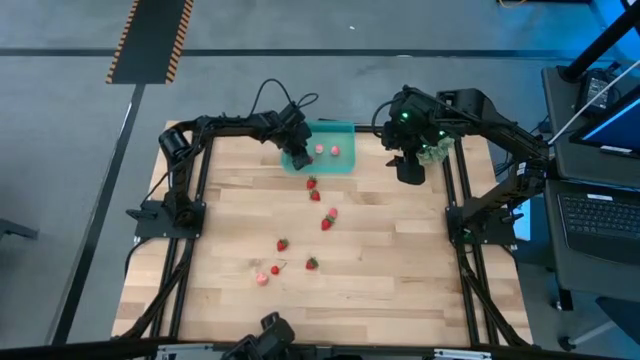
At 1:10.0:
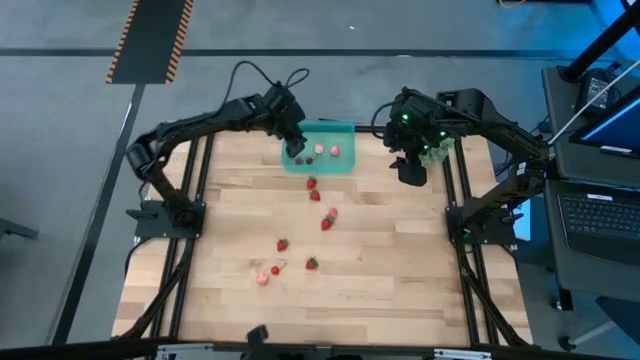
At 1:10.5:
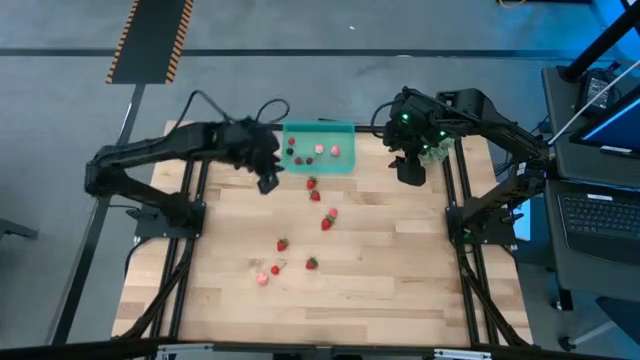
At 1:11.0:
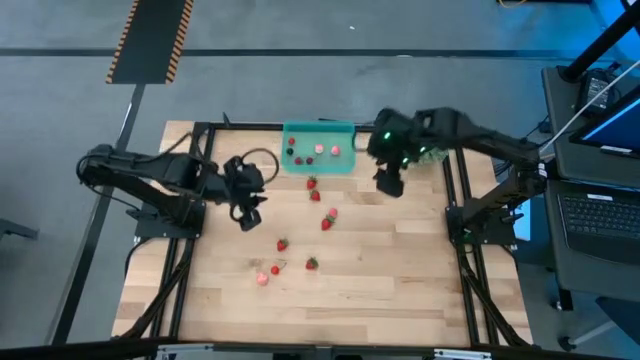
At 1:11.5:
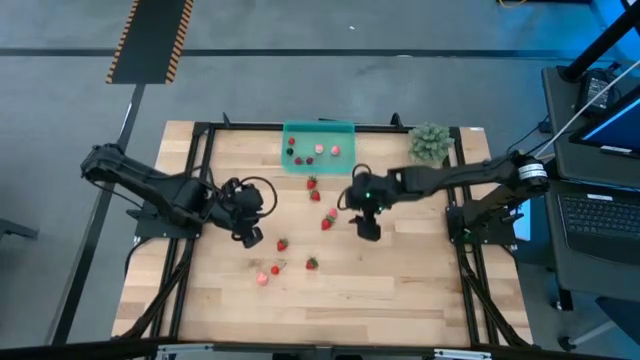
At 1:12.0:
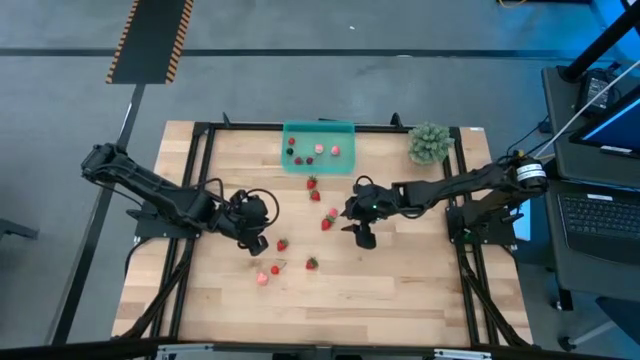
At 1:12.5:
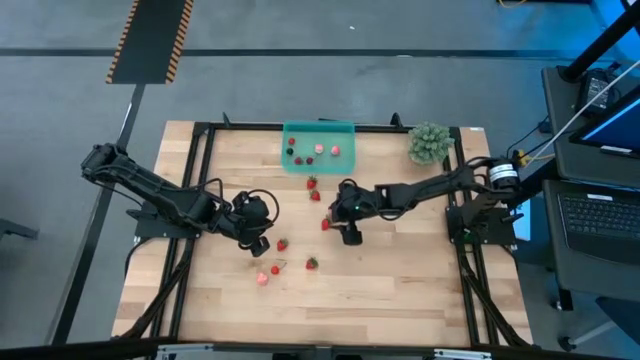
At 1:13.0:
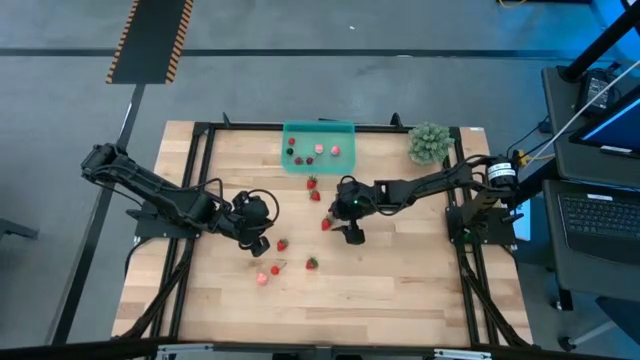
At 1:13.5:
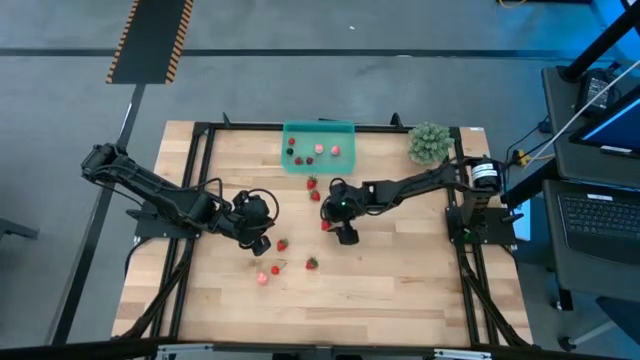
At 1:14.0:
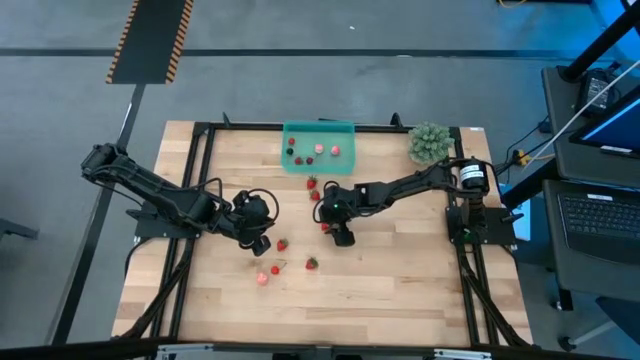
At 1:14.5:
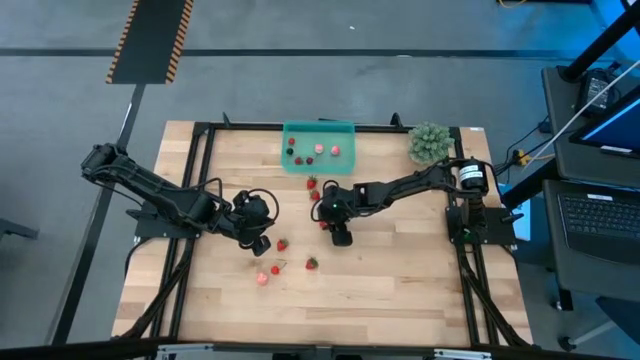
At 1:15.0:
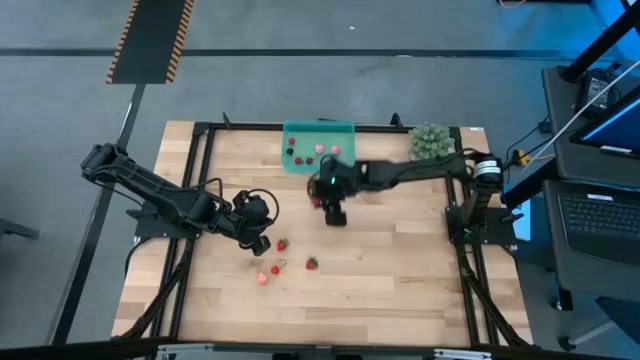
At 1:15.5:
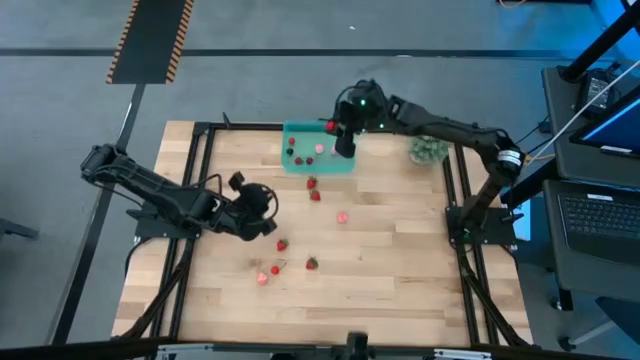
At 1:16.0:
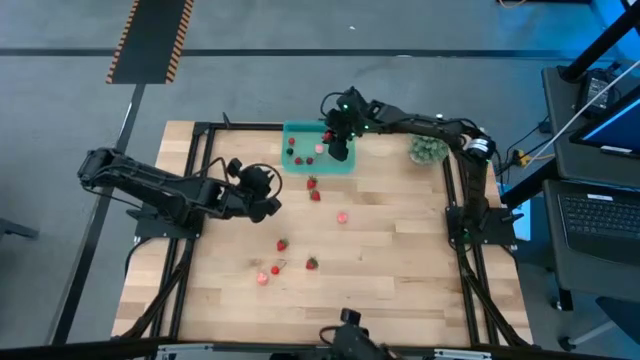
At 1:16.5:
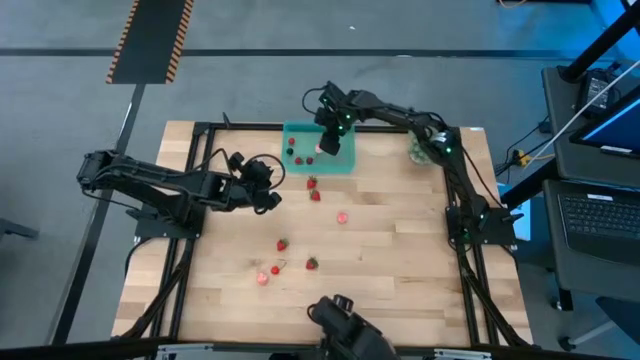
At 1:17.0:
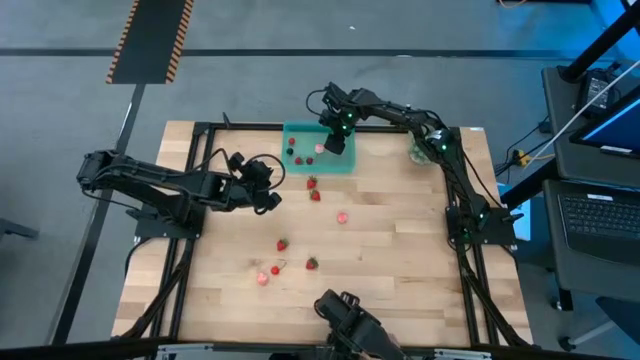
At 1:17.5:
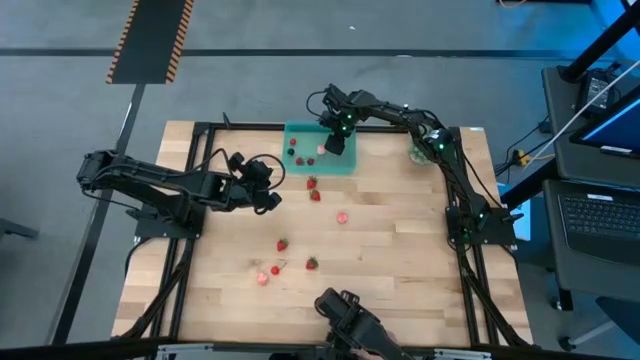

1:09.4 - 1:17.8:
Task: Pick and placing Produce into tupperware
Put the red strawberry into the green container

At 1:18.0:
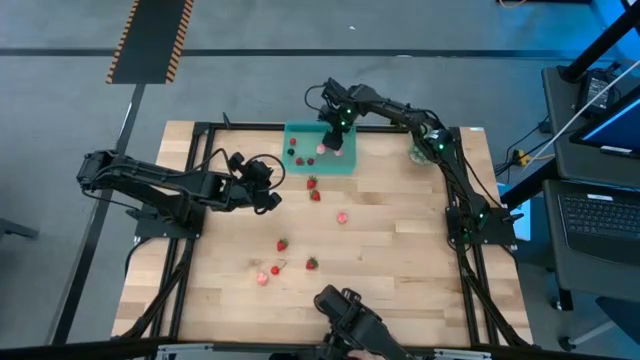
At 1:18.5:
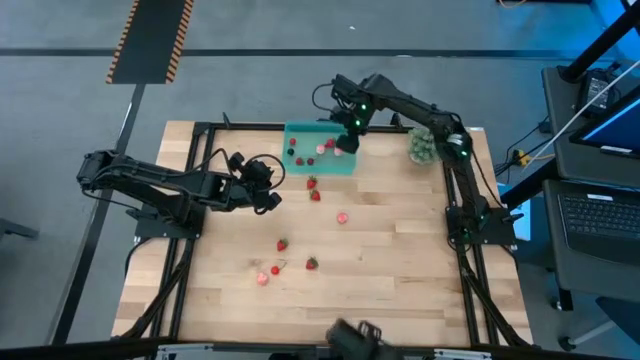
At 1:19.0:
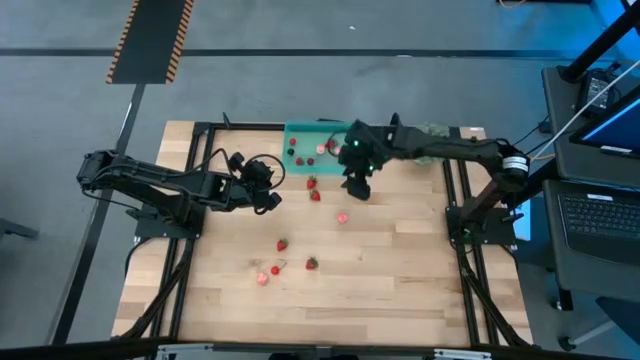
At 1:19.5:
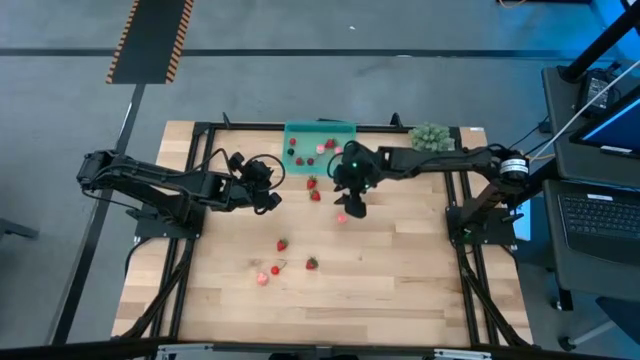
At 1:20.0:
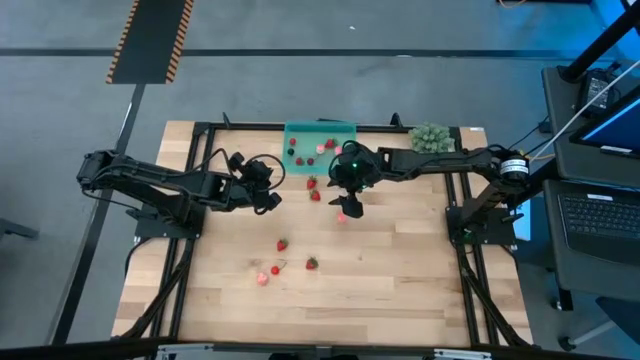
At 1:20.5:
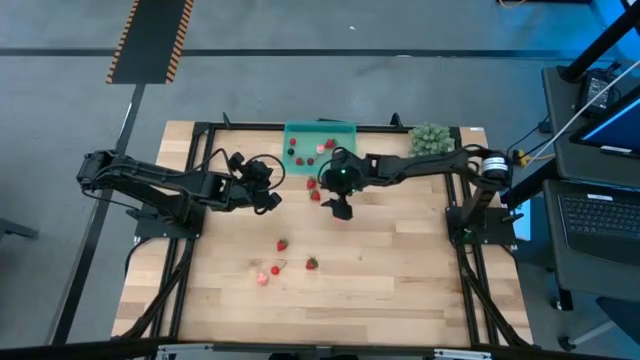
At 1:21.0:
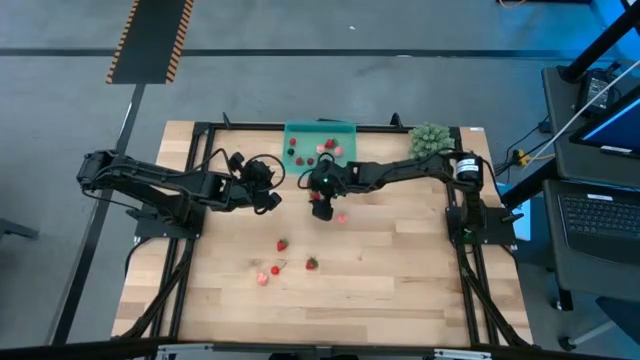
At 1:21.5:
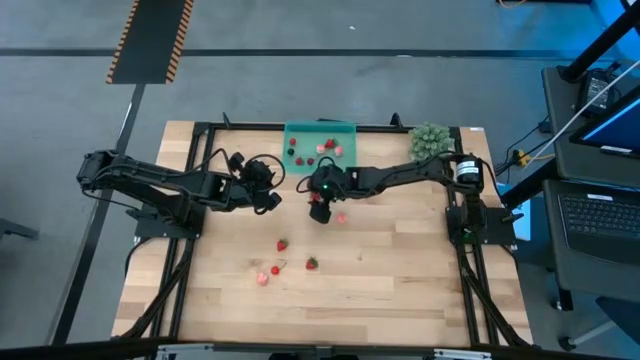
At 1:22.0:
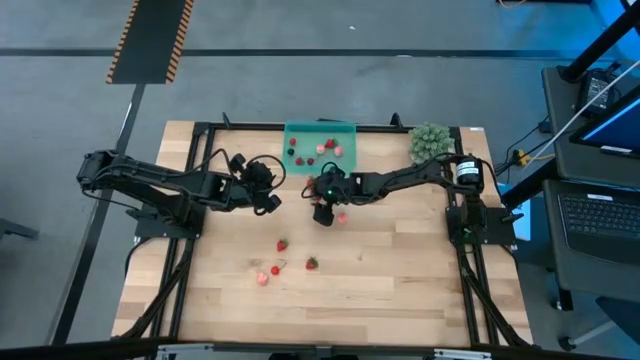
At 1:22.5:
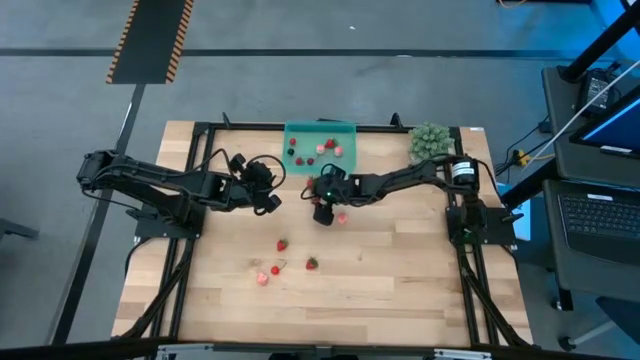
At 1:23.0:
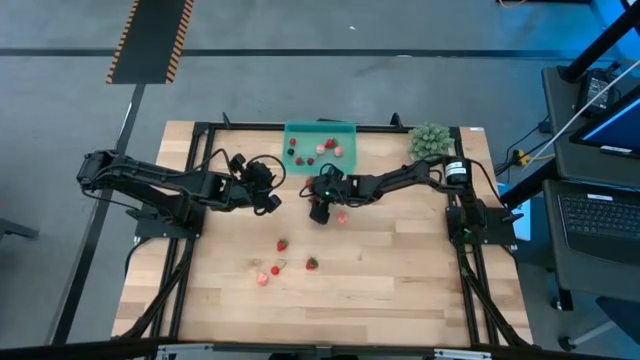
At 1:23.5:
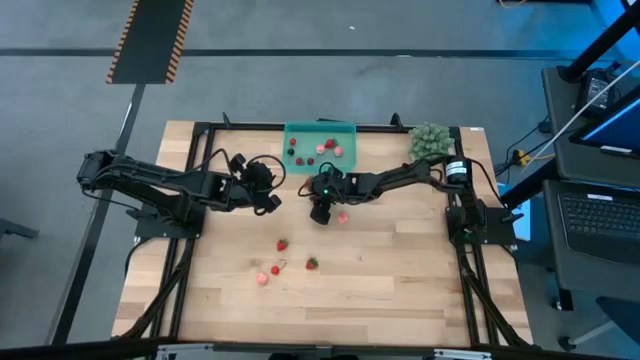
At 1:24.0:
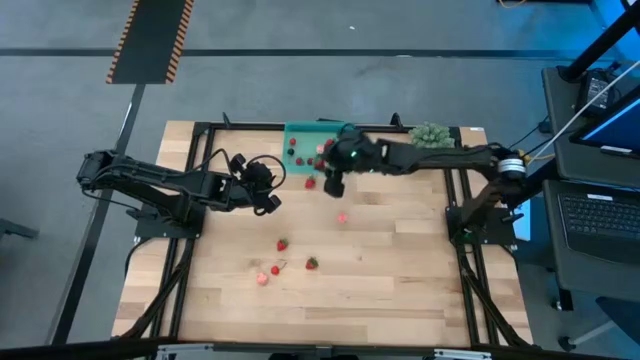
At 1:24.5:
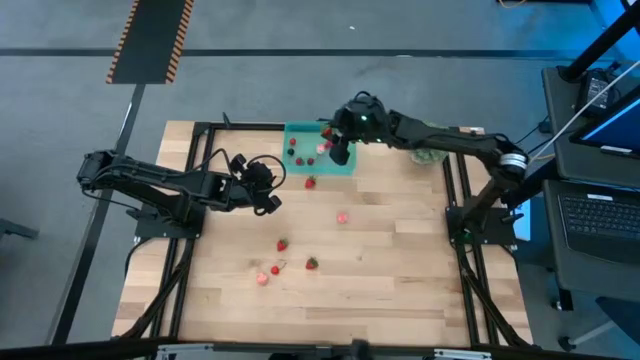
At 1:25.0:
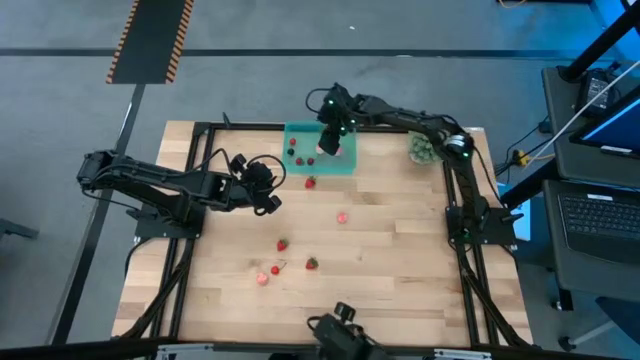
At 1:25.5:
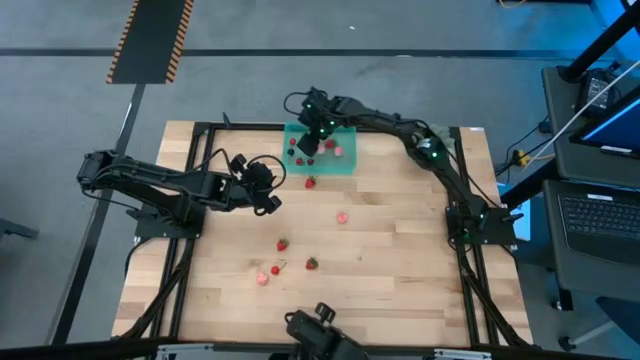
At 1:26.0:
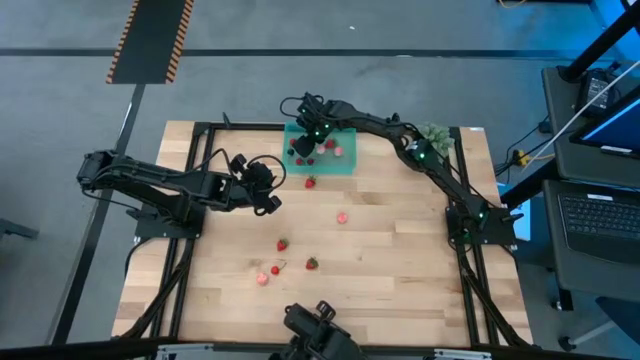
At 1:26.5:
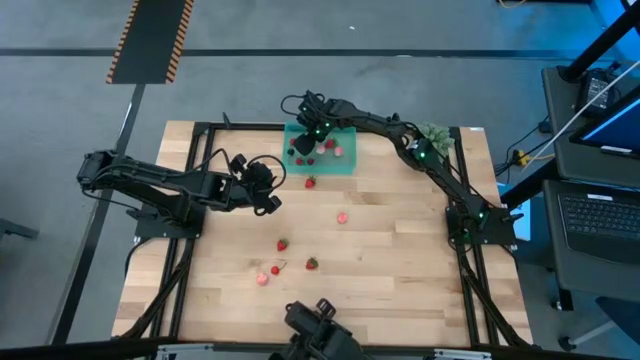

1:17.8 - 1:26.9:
Put the red strawberry into the green container

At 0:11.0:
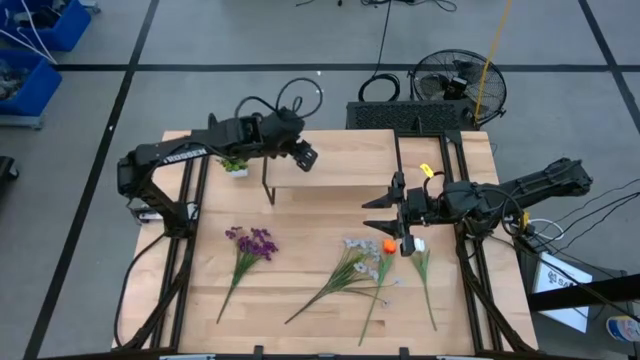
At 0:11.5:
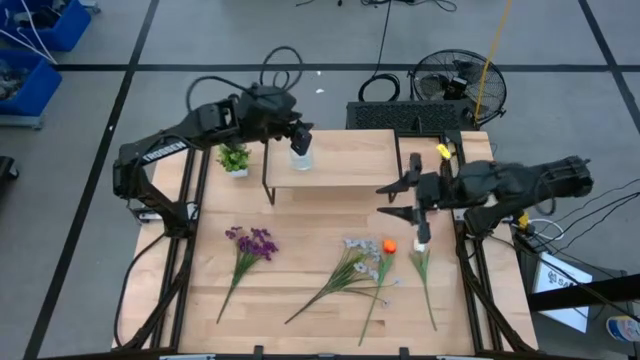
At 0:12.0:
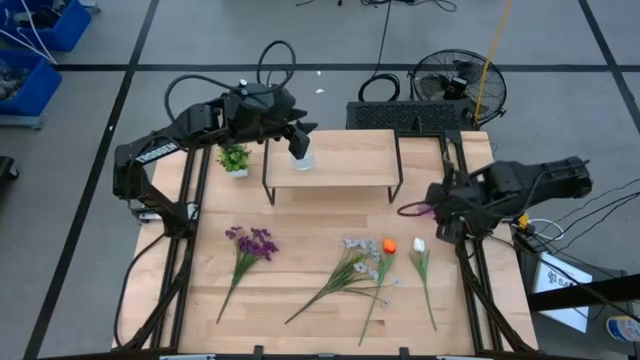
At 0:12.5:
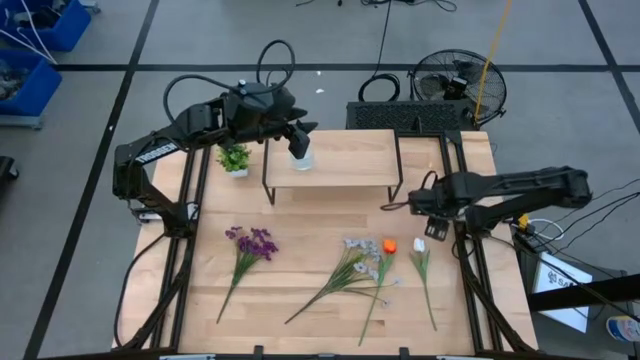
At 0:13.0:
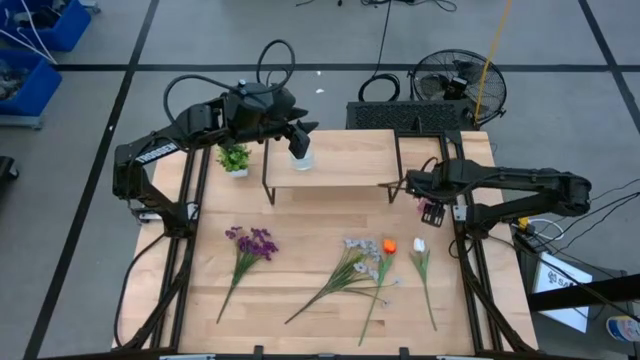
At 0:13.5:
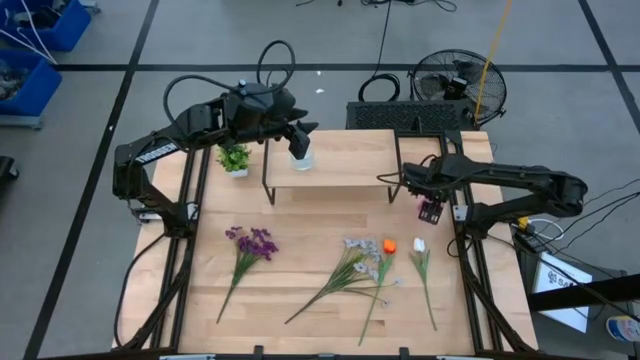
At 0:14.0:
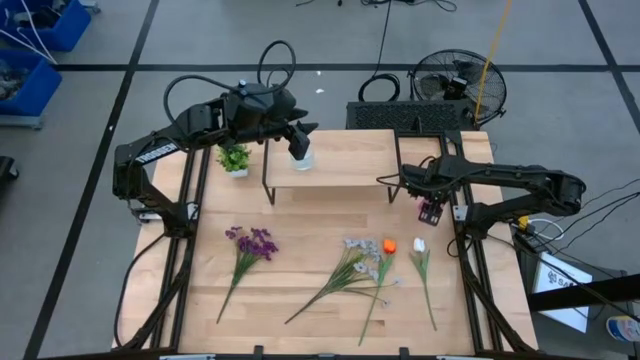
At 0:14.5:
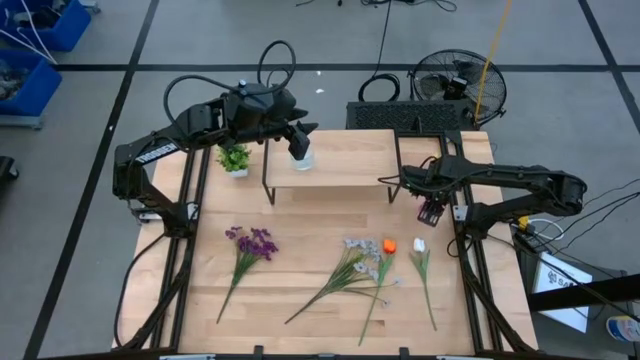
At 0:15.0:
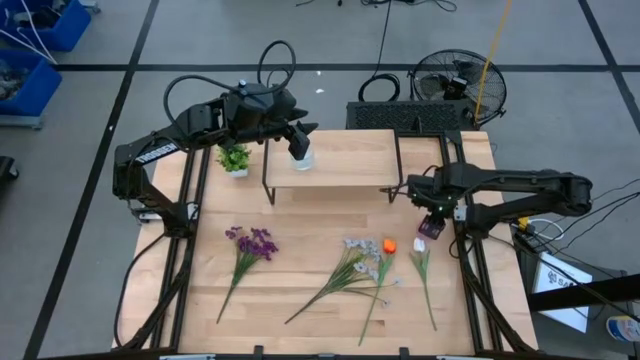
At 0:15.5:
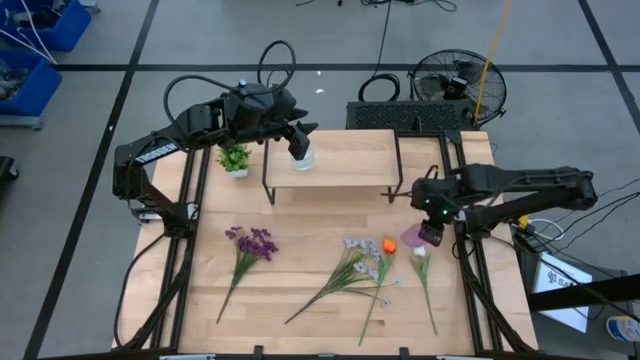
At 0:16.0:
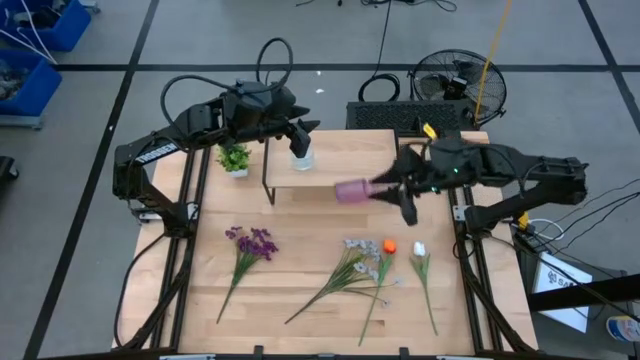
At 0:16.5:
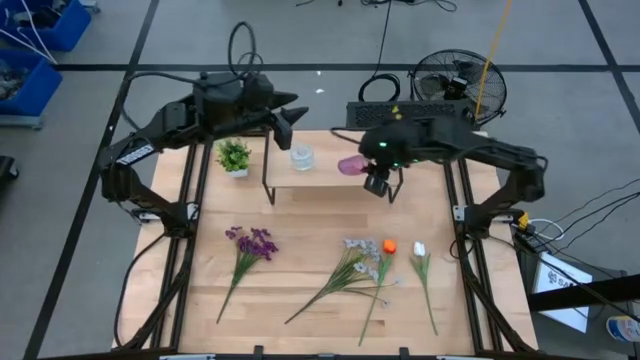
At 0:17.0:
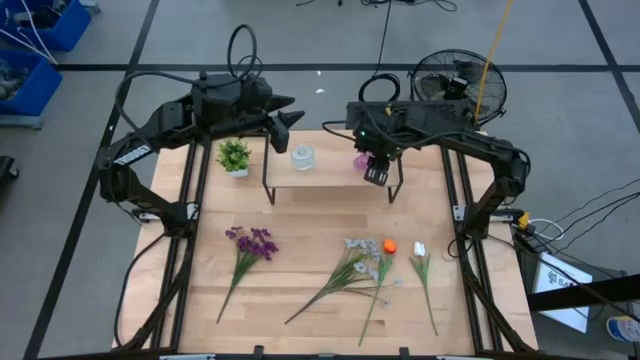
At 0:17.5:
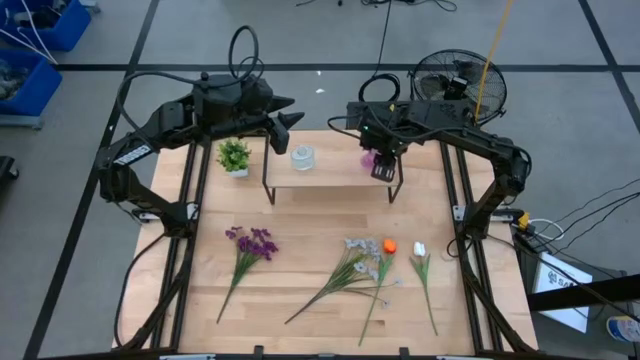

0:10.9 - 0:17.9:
Task: Pick and place flowers into a vace then onto a shelf
Put the violet vase on the shelf
